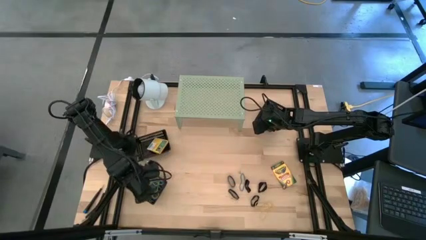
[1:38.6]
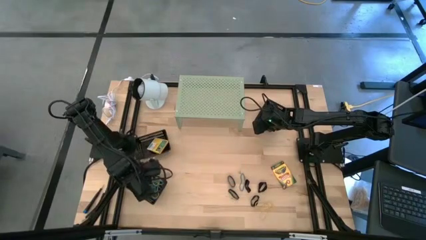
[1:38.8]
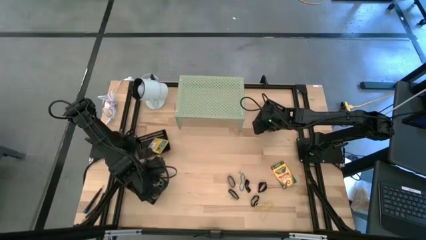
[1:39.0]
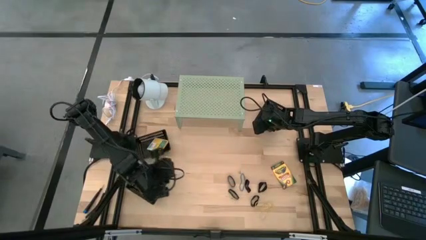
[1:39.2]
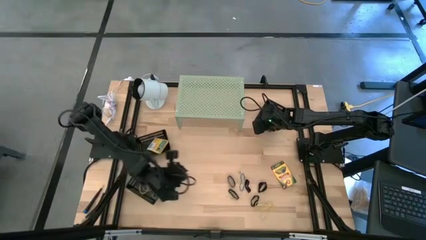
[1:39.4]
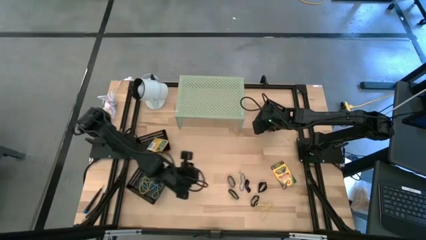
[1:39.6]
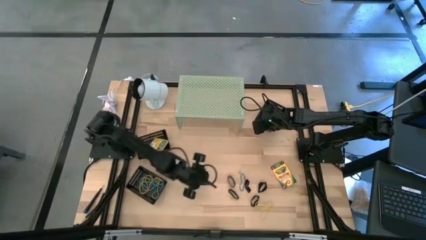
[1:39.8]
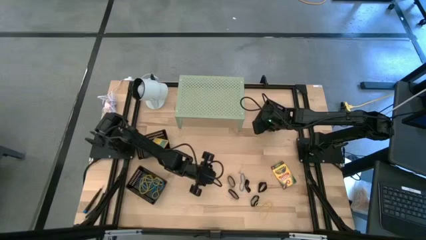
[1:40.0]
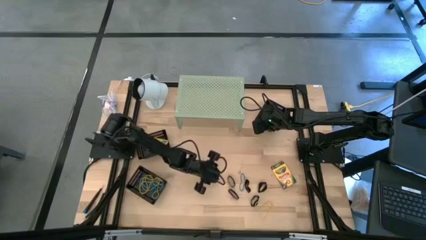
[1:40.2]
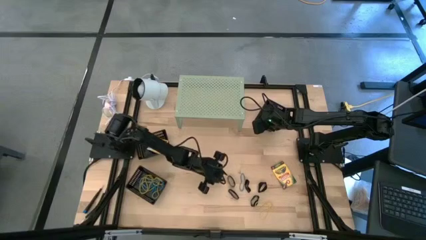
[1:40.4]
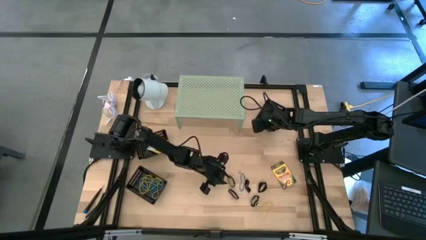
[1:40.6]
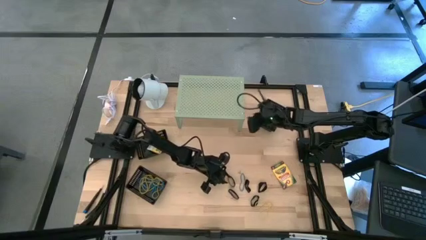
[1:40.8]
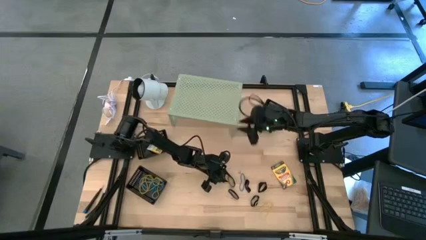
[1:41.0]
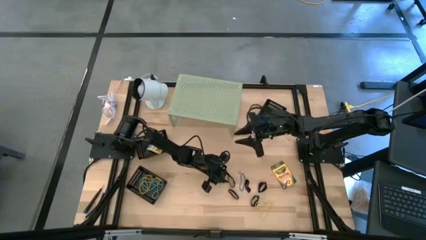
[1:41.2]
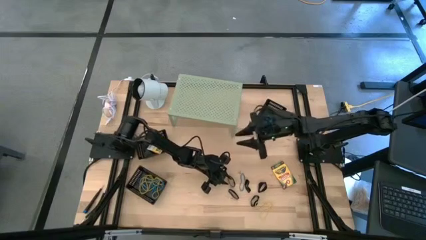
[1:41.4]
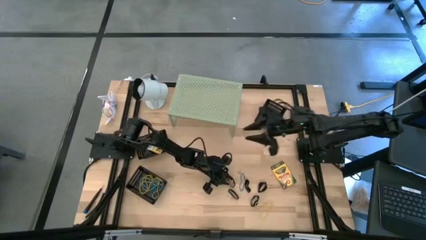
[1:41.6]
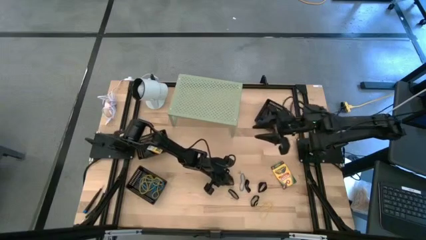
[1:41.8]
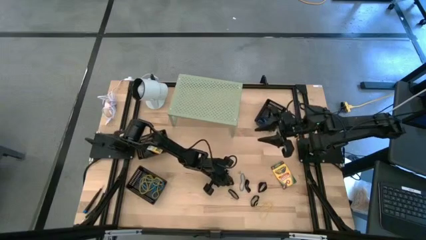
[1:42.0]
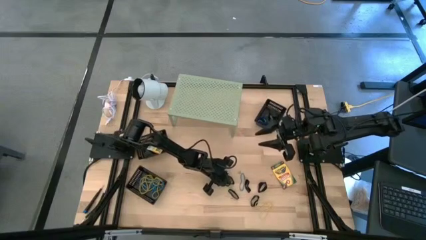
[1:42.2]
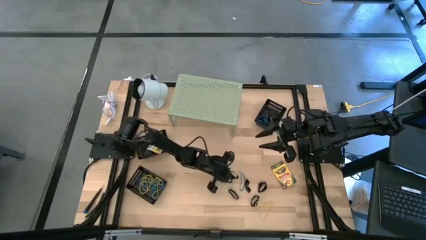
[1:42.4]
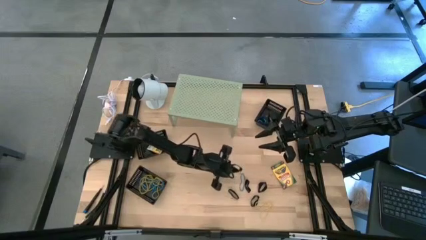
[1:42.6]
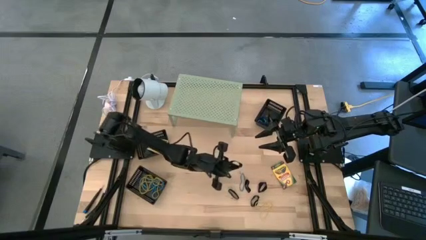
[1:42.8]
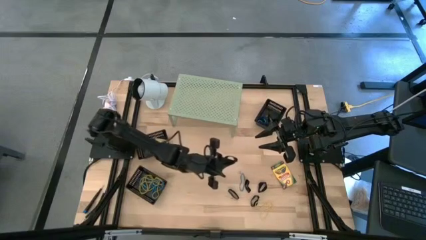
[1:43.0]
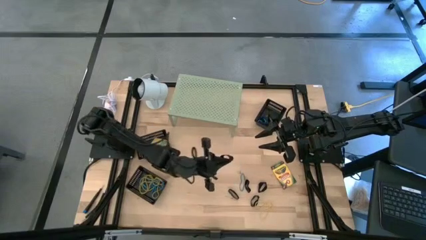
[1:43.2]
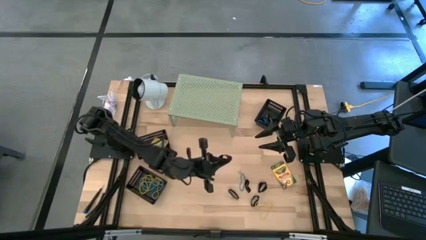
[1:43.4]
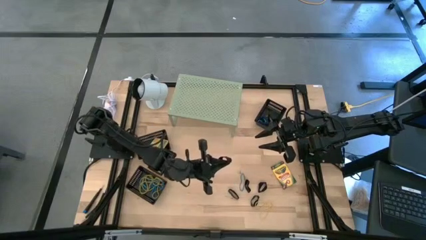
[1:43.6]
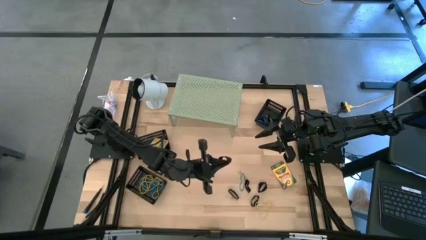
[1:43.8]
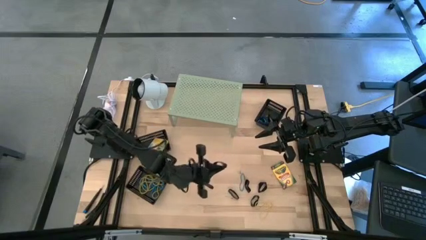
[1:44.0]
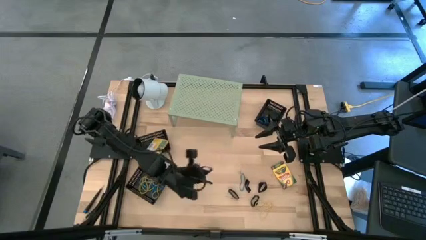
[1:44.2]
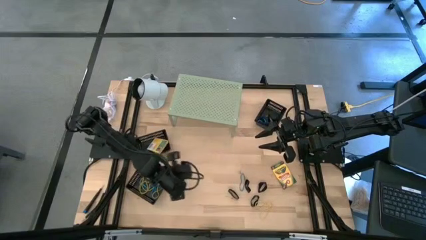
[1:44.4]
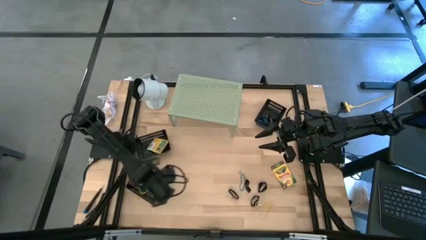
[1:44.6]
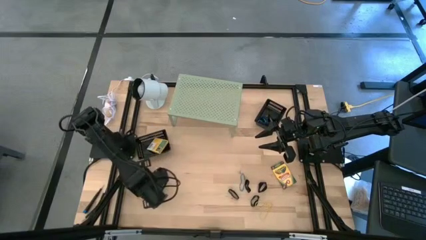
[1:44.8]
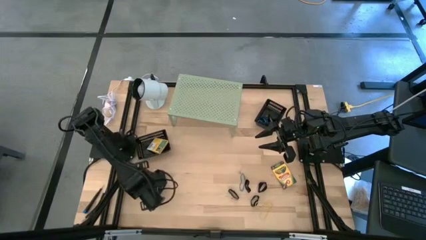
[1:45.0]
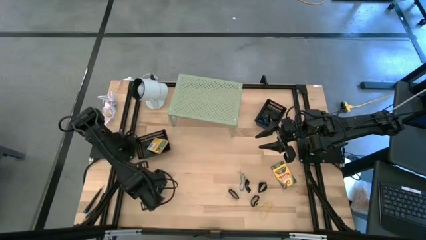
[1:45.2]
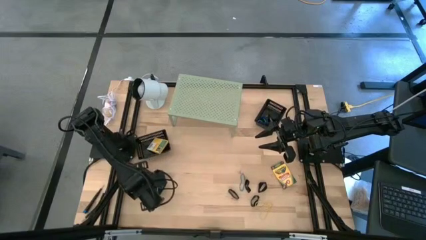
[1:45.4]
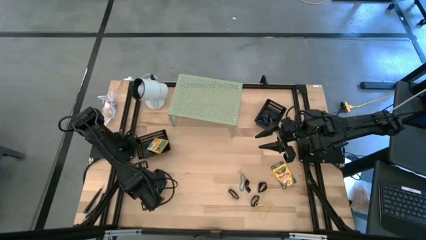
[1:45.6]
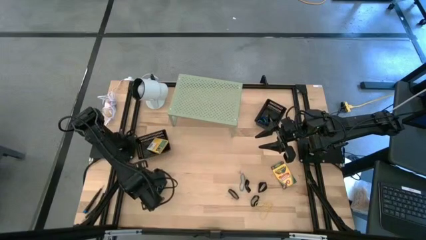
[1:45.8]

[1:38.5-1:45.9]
Task: Pick & Place Office Desk Supplies
Put the black rubber band into the bottom left black bin

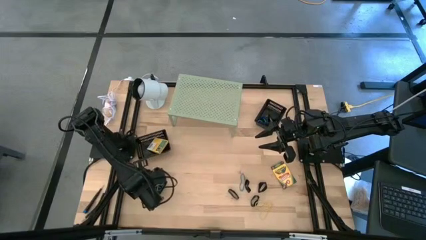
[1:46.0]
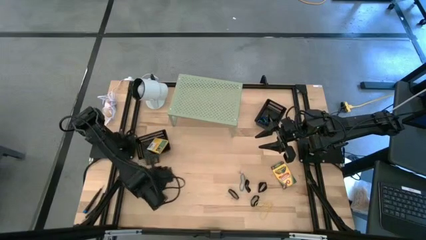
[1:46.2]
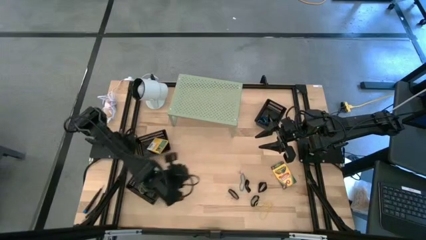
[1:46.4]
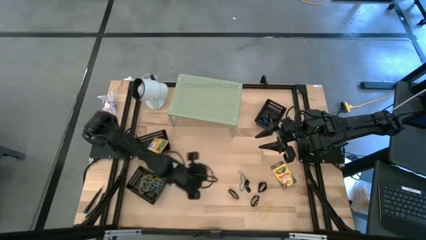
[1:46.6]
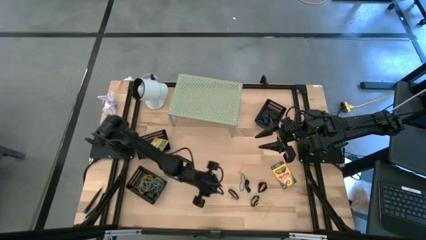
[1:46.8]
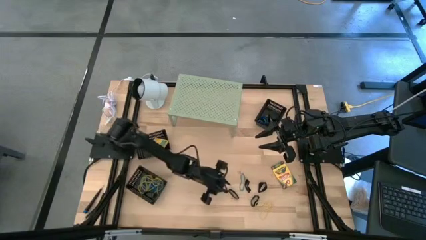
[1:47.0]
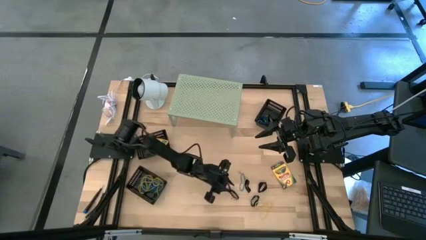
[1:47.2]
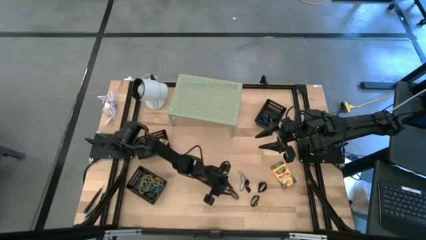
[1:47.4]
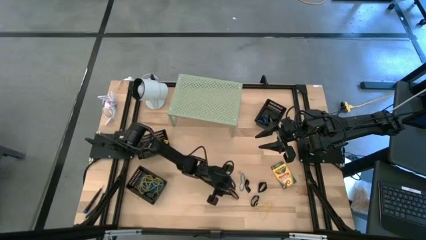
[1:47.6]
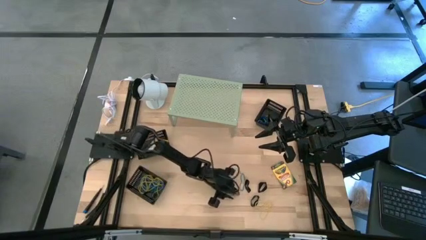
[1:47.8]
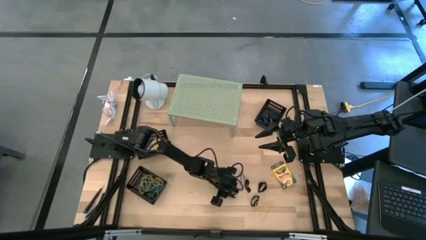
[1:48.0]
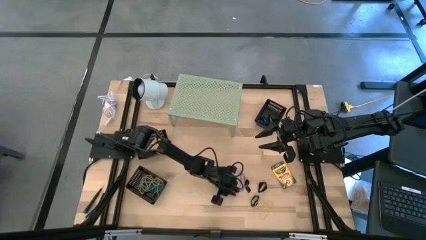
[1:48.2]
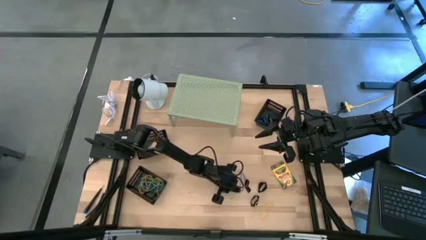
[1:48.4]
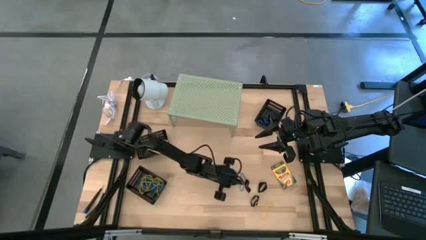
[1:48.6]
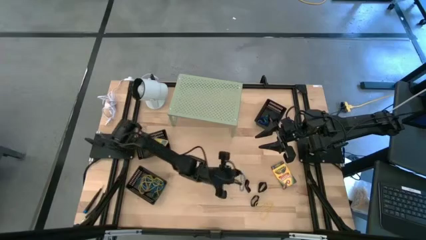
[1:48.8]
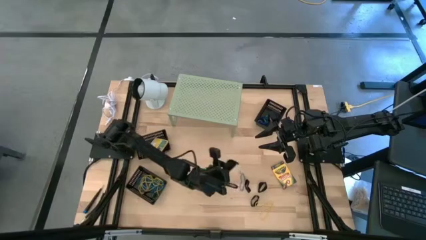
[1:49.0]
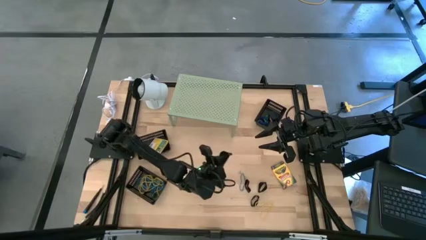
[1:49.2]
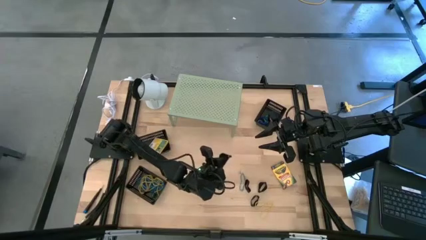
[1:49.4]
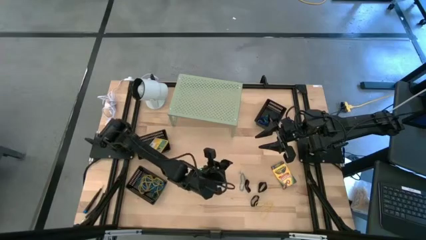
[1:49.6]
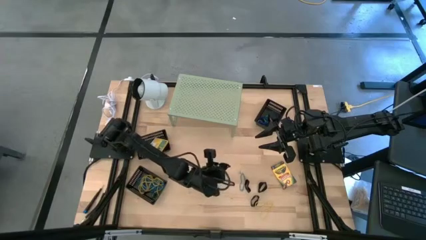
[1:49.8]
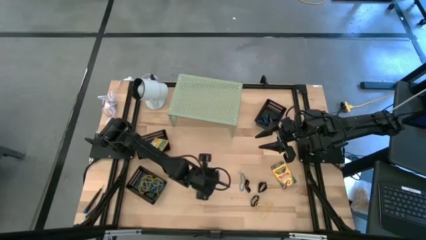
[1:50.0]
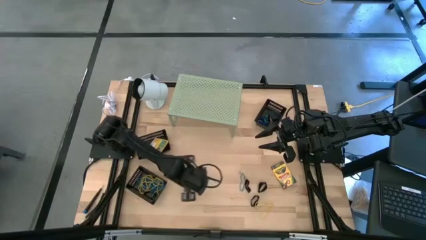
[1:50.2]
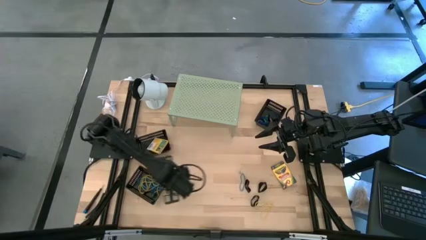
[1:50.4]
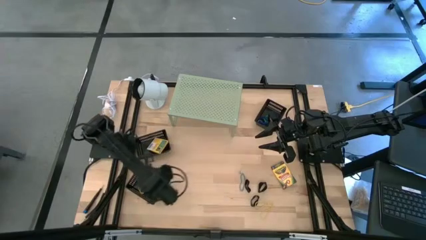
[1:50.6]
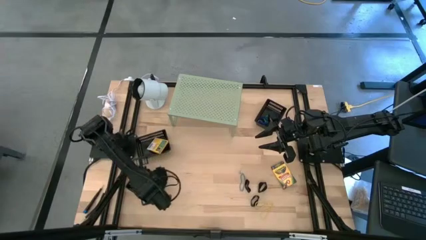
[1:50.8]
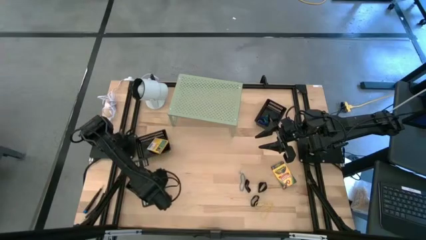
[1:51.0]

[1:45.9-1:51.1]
Put the black rubber band into the bottom black bin

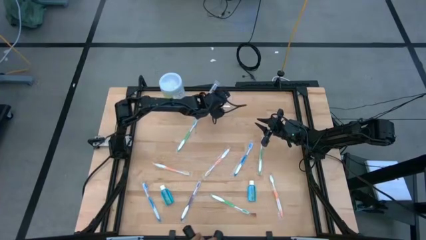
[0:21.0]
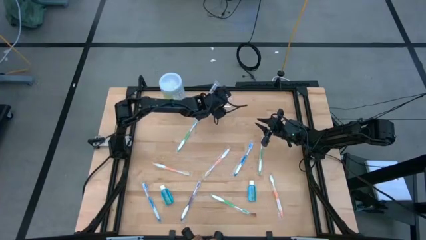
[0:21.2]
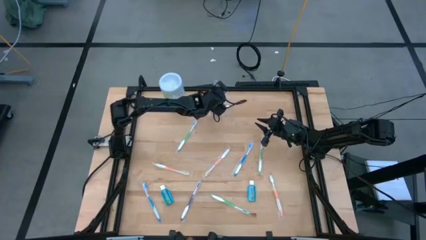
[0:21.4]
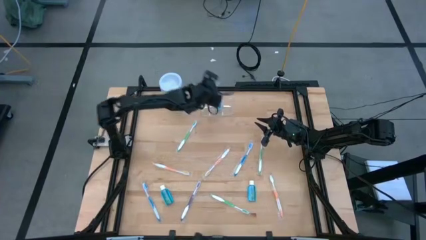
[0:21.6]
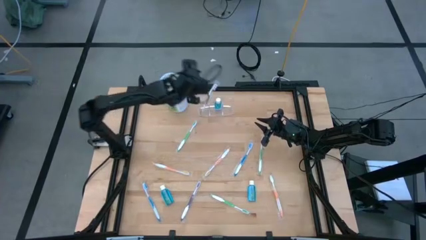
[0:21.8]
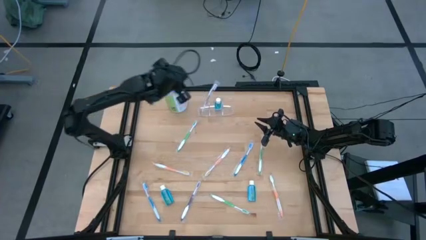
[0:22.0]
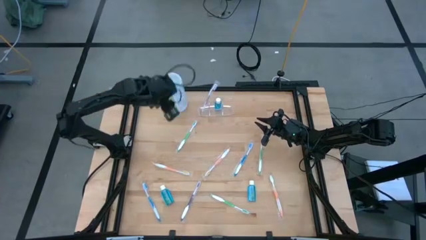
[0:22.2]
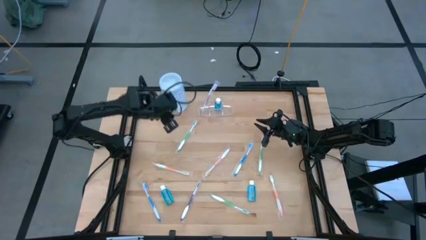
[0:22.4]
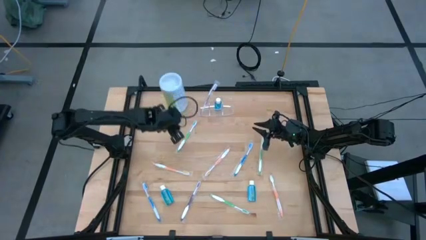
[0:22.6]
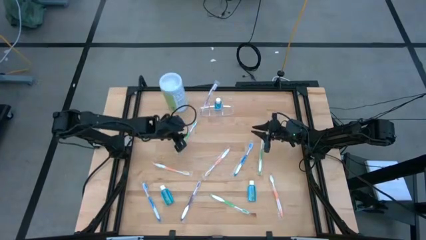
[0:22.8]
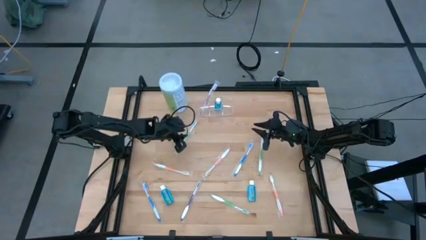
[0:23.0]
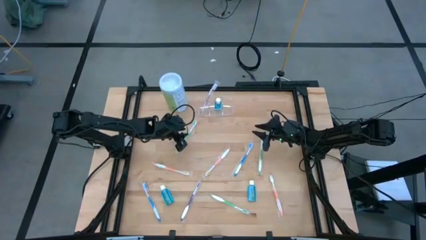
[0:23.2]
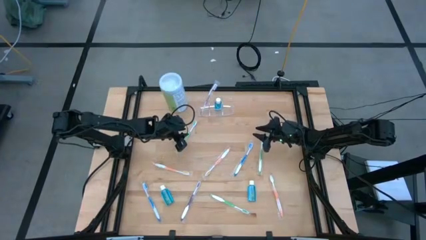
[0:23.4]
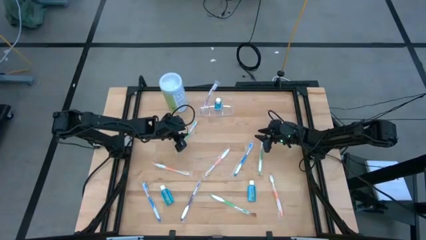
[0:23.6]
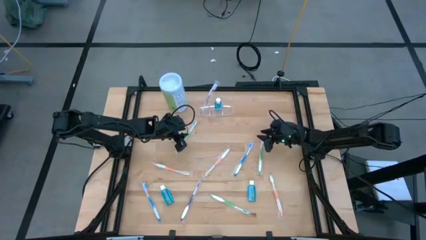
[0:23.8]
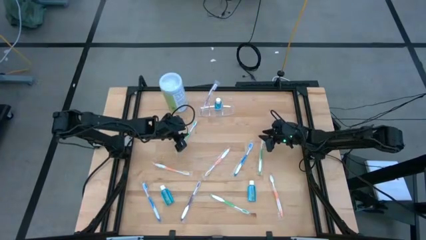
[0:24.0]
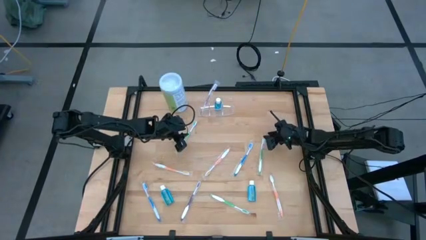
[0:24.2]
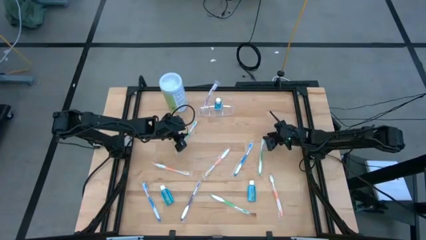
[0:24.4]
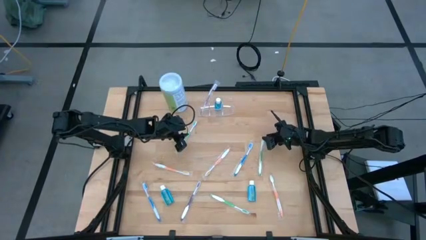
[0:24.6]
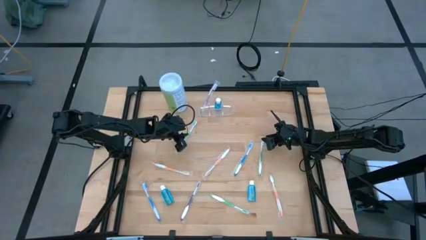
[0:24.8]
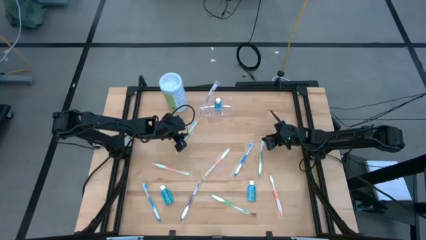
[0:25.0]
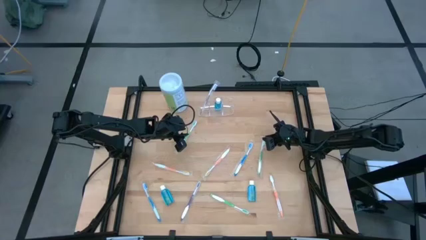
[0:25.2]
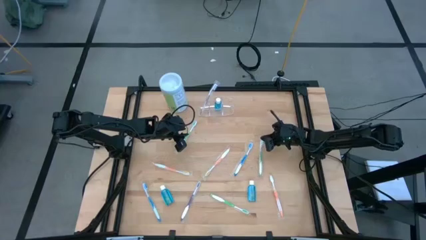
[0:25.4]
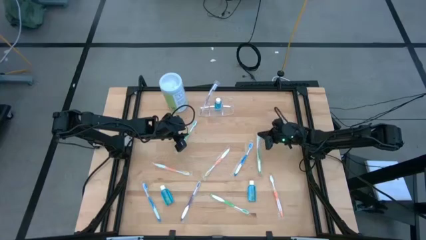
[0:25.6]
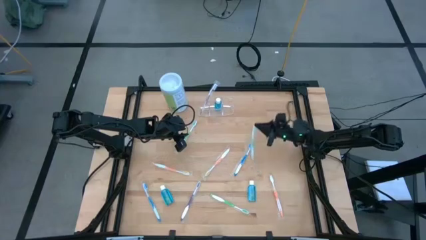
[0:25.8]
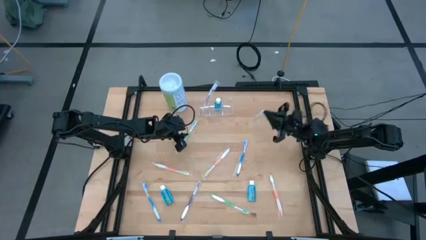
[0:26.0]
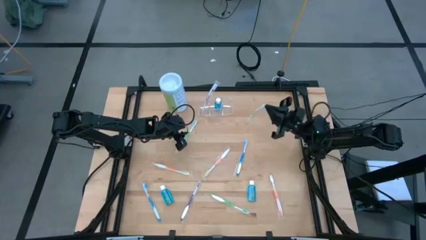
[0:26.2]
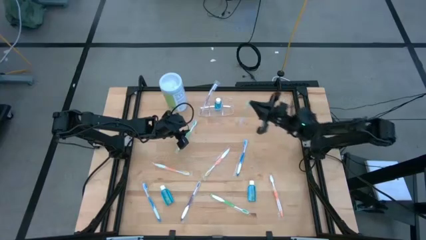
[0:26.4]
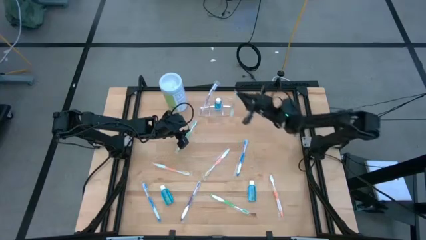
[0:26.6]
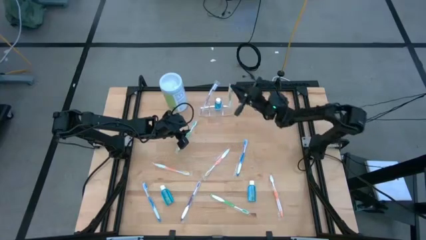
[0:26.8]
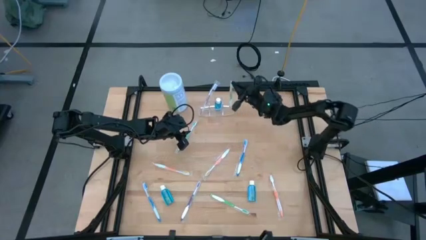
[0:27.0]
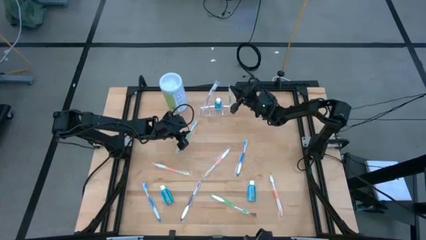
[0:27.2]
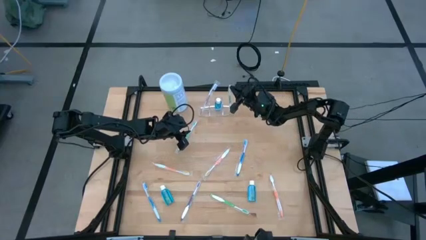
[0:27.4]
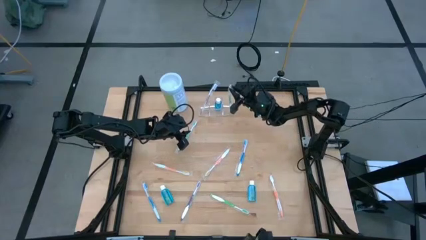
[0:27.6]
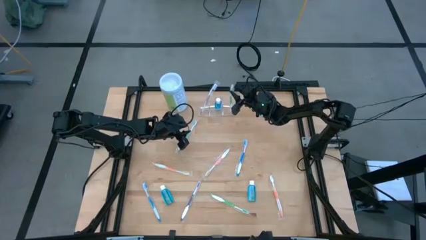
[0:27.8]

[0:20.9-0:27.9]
Task: Pick & Place toothbrushing station
Put the top right green toothbrush into the transparent organizer
